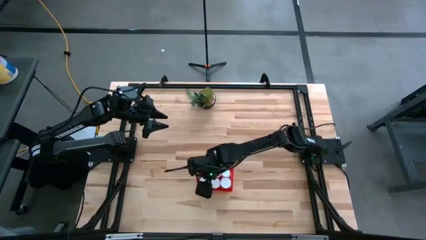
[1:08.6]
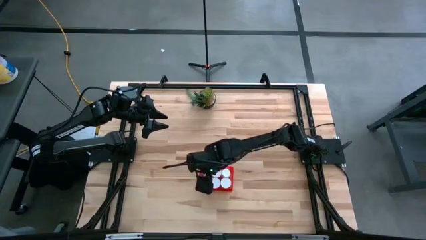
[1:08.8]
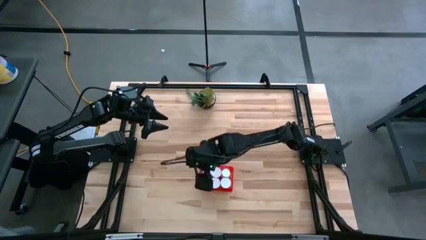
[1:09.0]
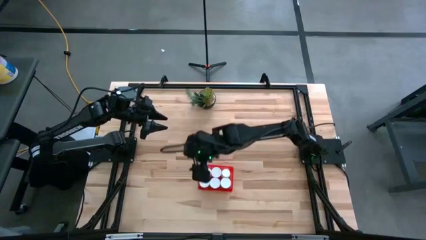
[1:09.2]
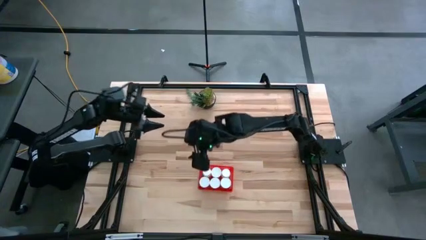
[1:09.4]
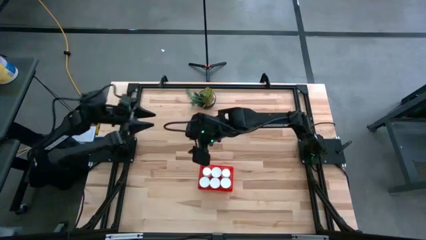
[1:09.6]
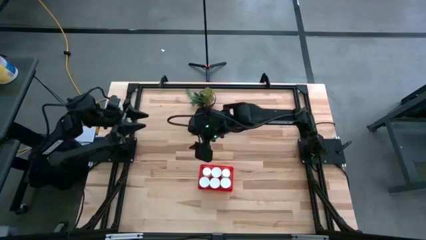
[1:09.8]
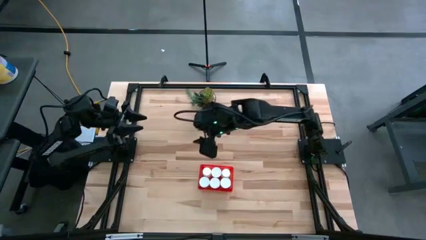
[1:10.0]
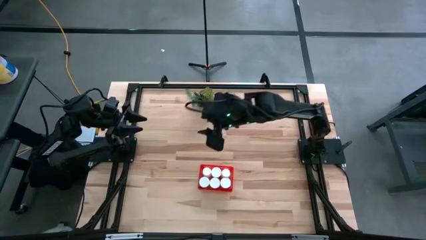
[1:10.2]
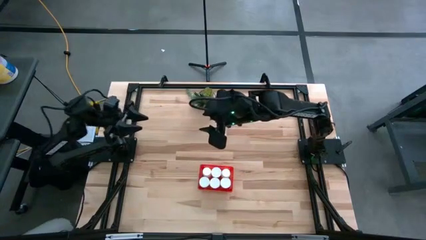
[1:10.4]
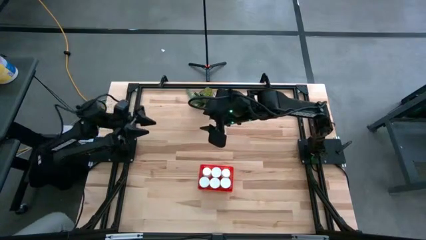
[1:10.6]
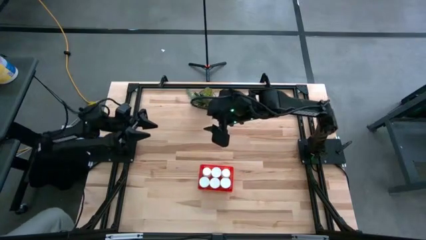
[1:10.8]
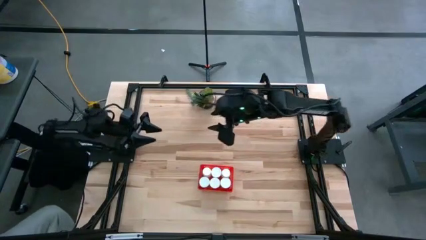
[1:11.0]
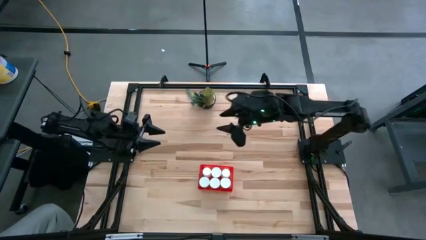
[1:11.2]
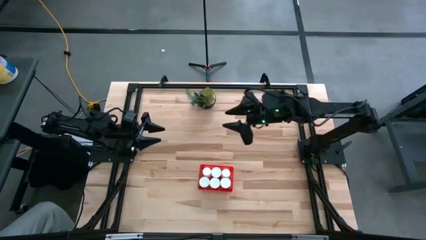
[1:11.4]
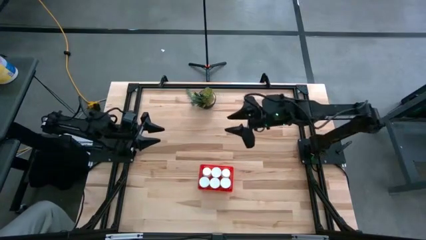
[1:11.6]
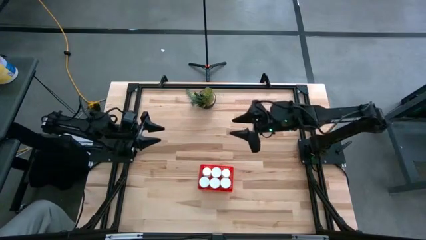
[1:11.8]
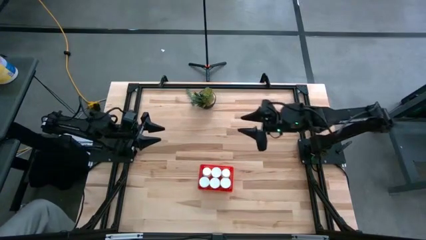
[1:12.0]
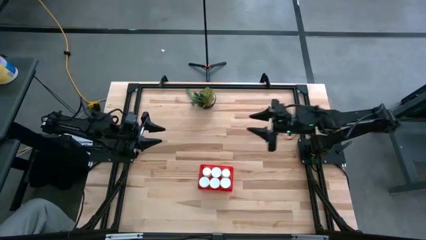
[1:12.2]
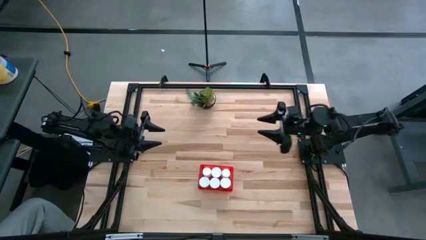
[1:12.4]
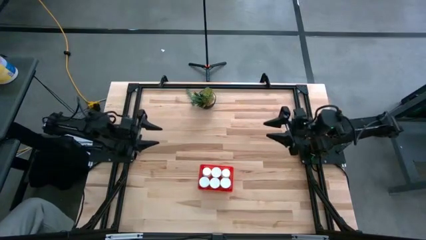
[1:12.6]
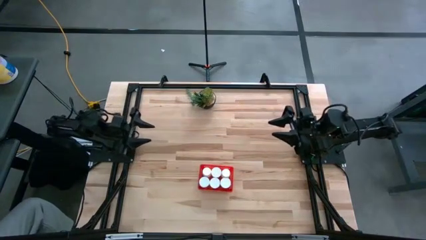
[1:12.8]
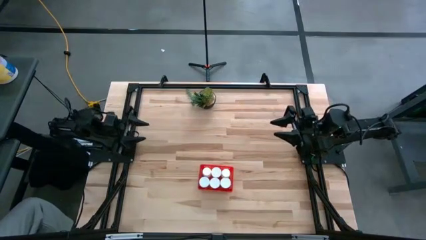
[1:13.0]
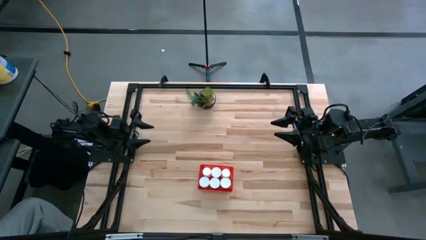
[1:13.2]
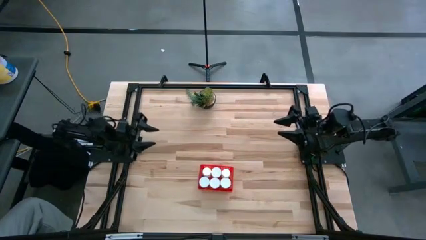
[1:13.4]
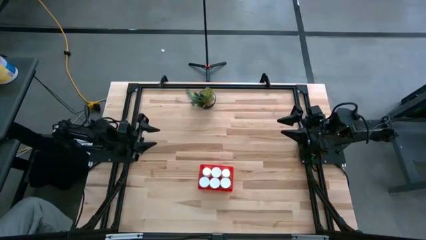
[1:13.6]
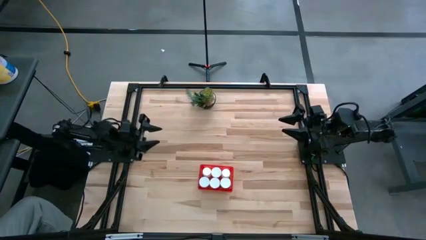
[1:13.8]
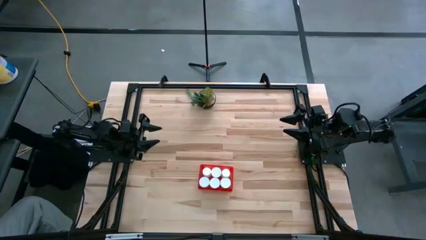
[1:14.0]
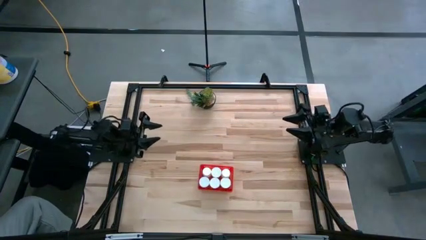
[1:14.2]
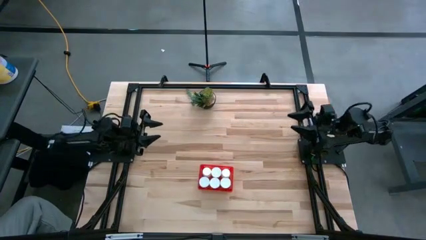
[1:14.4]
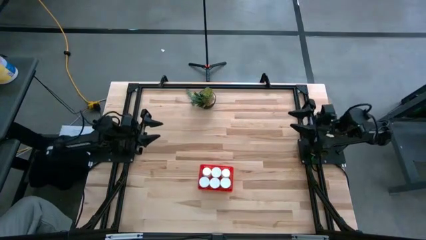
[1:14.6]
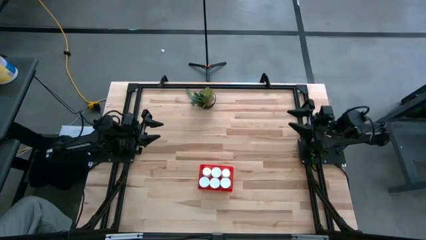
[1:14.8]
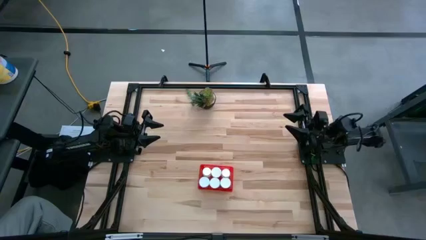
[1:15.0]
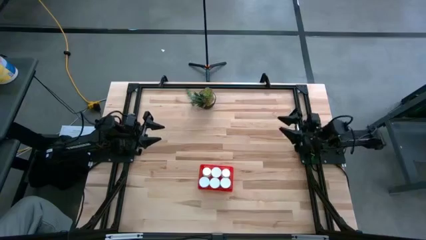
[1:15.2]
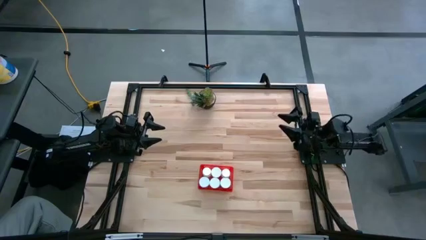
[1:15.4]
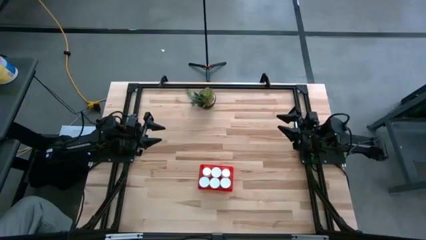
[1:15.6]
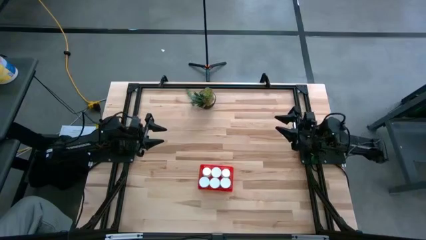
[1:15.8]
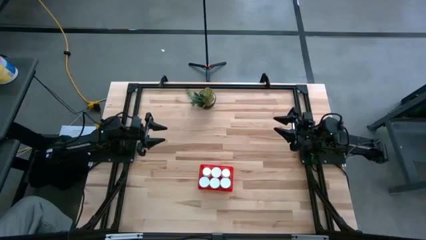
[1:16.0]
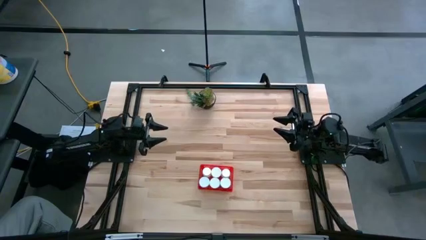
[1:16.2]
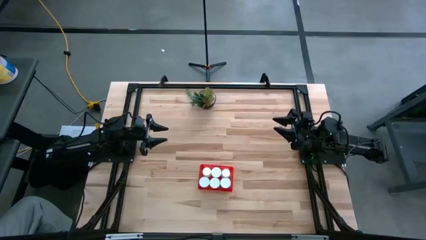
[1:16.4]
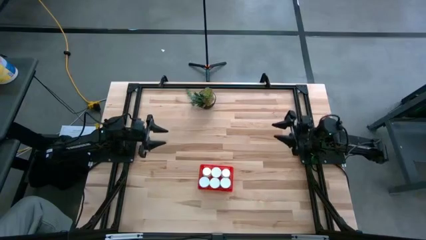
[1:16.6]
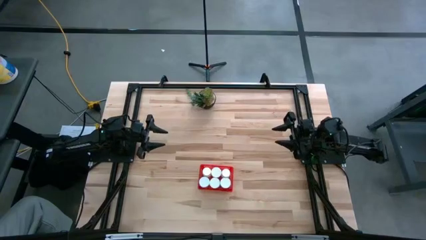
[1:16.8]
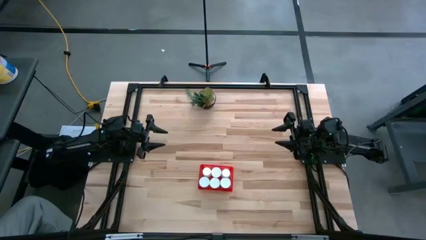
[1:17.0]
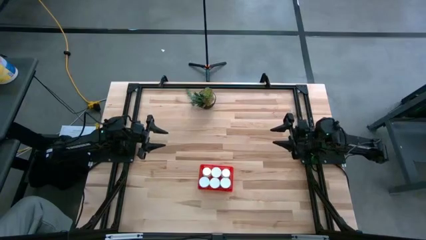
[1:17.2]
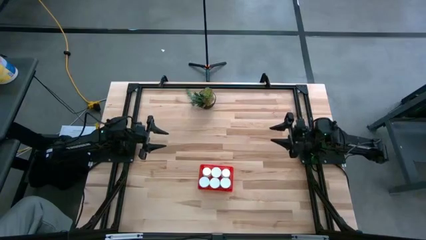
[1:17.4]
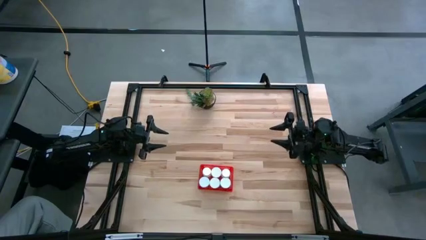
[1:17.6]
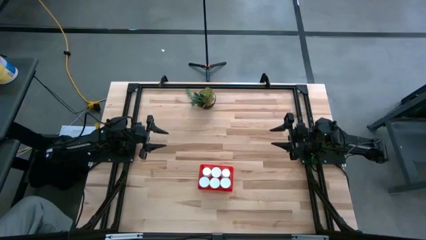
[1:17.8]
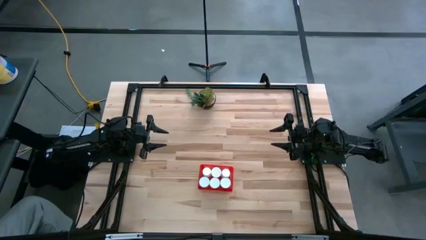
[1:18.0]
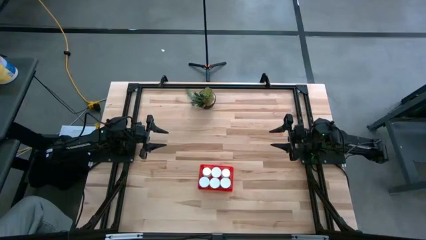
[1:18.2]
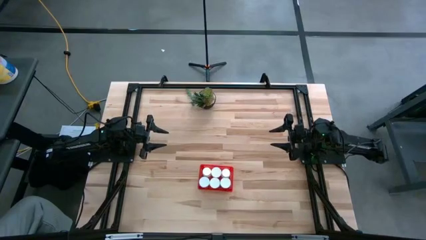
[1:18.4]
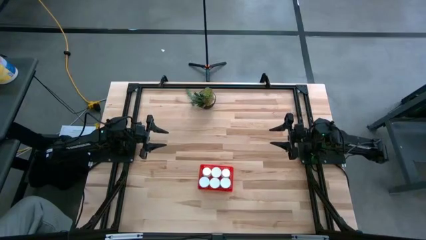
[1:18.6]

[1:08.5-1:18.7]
Task: Pick and place pill bottles into a basket
Return to Home Position

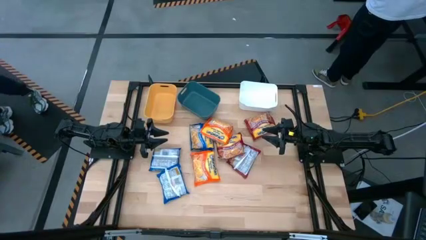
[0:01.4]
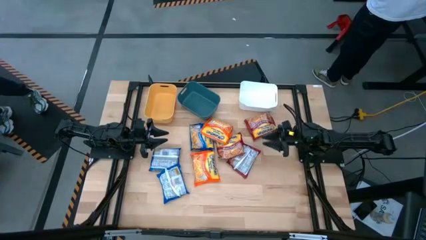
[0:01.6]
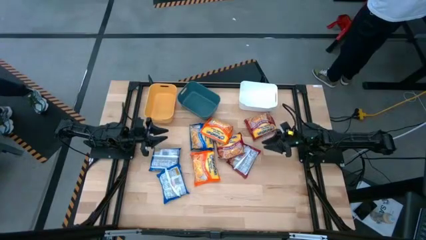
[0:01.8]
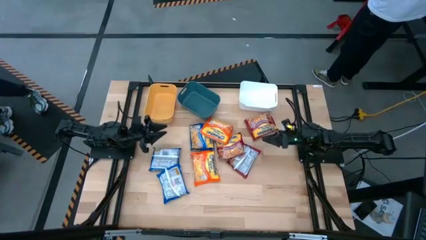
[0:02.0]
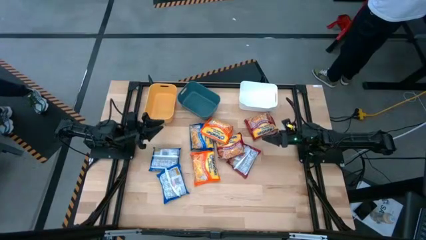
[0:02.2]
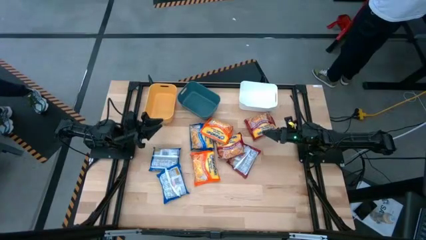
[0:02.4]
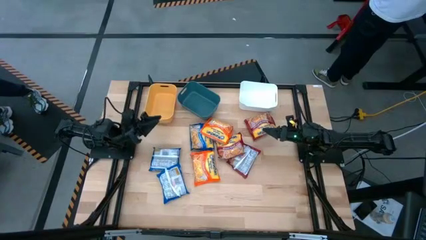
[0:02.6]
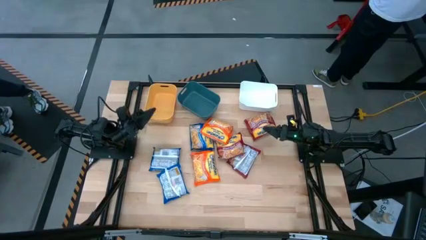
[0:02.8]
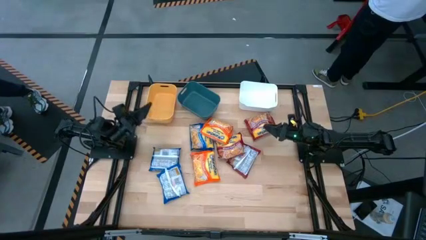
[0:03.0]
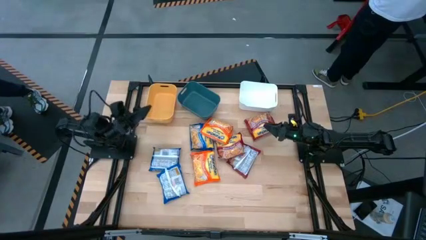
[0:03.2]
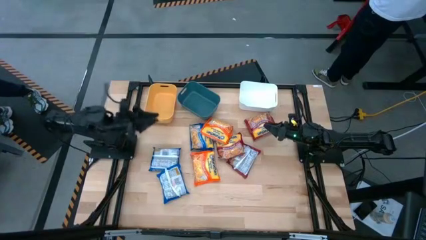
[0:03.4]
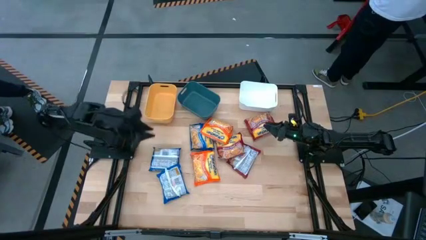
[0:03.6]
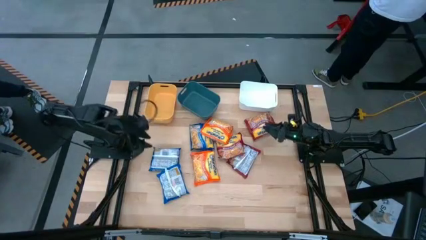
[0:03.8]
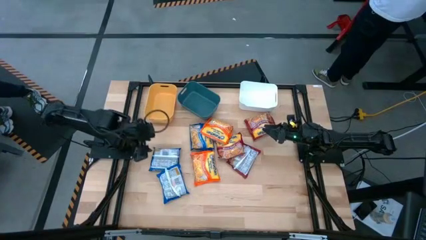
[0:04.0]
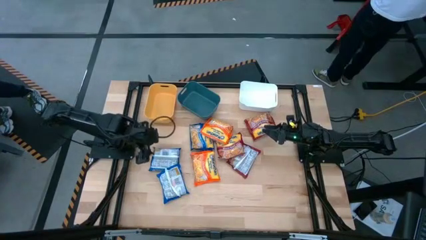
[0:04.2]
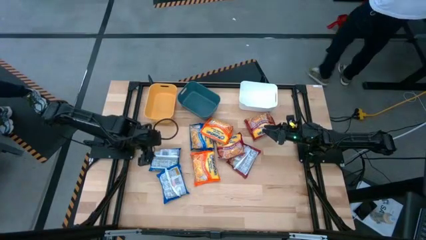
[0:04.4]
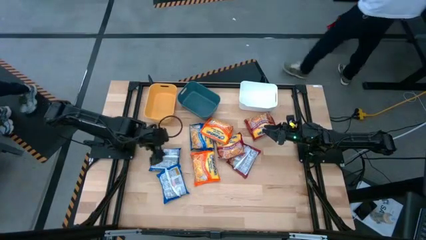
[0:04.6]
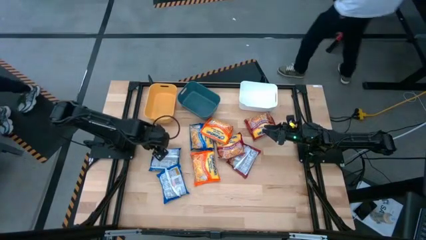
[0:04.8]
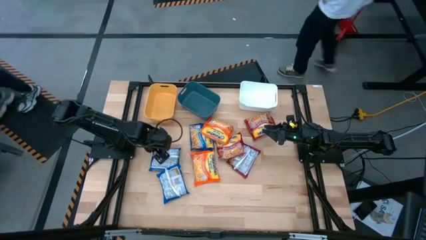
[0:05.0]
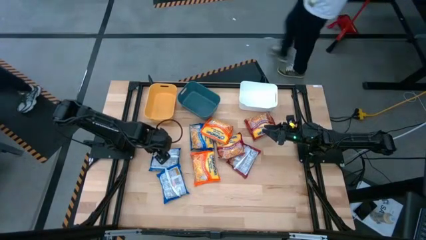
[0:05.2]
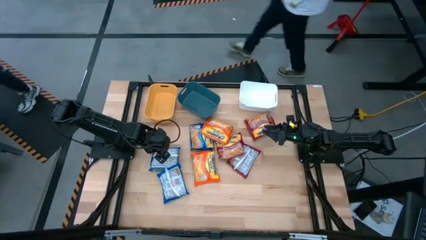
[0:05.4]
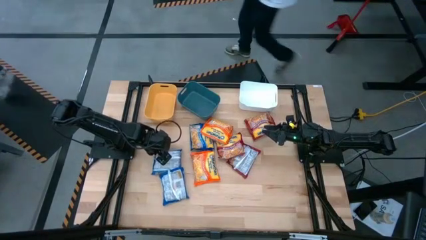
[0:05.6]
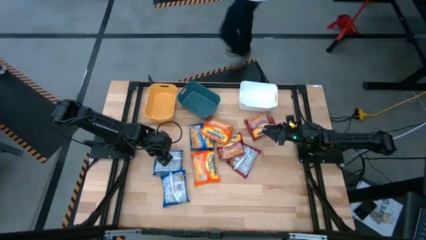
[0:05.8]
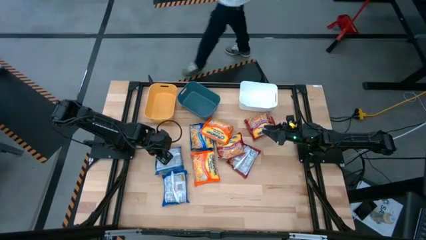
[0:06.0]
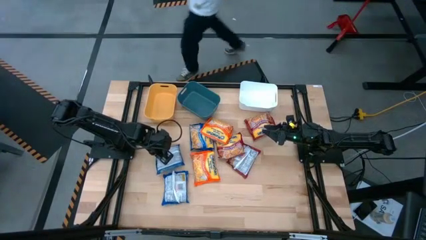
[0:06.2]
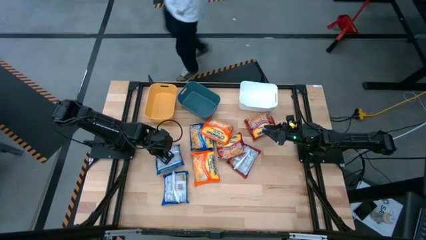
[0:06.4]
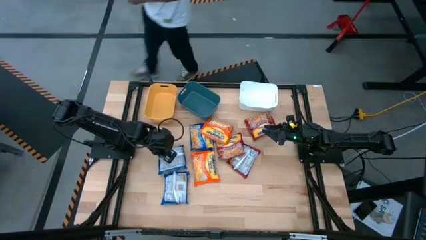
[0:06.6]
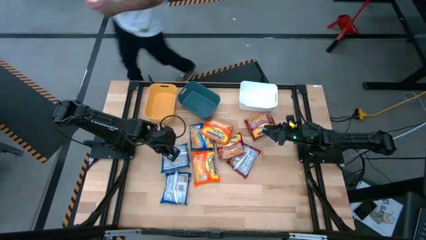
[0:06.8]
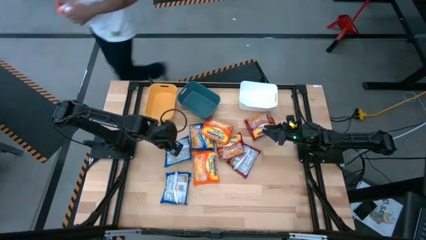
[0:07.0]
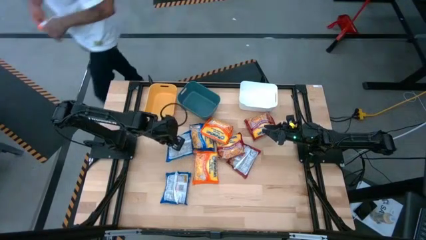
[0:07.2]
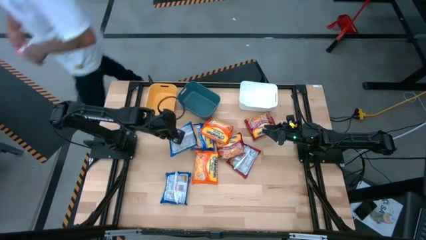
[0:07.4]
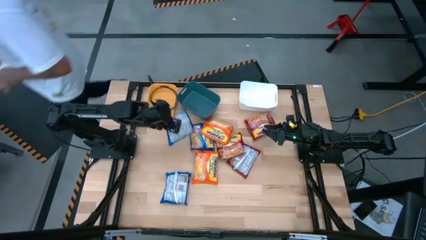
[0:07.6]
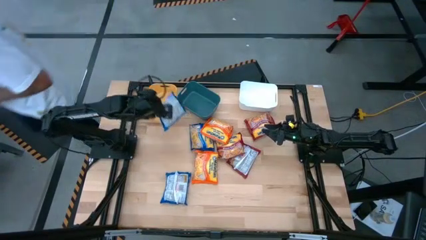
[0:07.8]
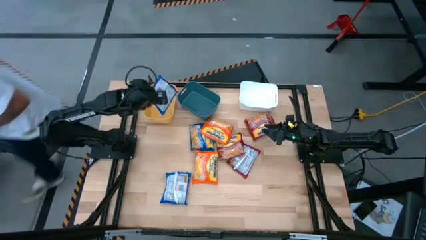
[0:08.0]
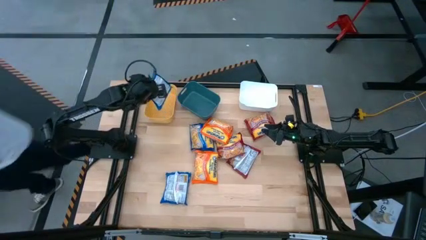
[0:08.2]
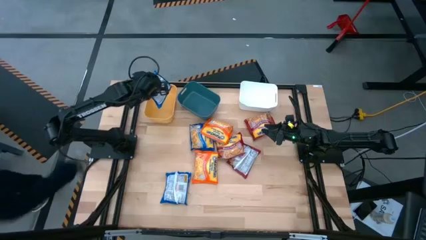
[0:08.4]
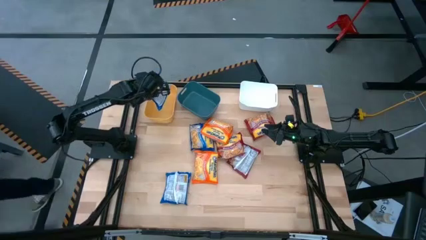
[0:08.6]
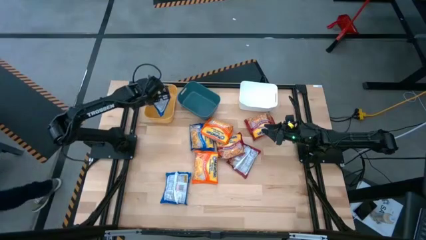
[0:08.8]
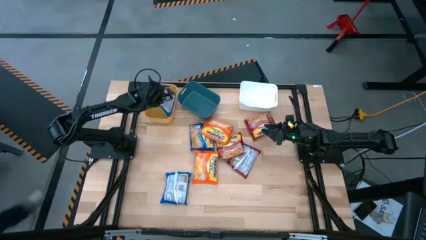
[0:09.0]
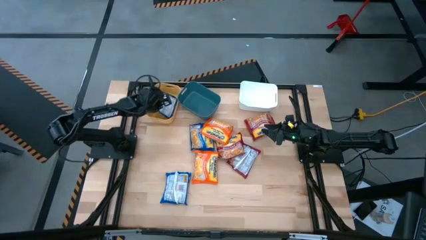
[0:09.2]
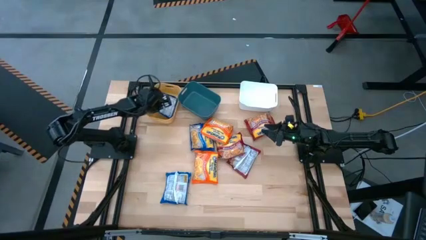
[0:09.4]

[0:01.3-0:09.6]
Task: Sort Maruchan noodles
Put the middle left blue bags into the yellow bin
